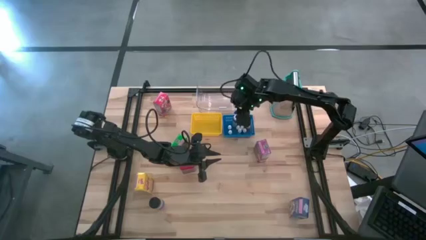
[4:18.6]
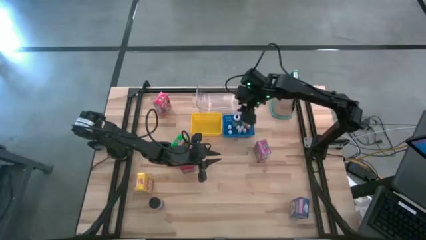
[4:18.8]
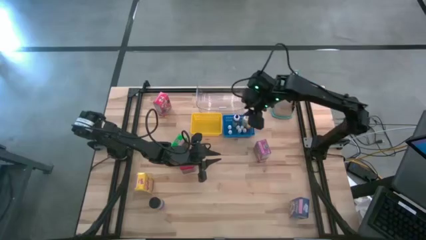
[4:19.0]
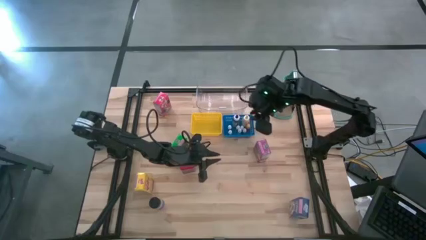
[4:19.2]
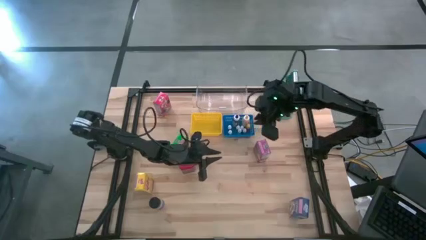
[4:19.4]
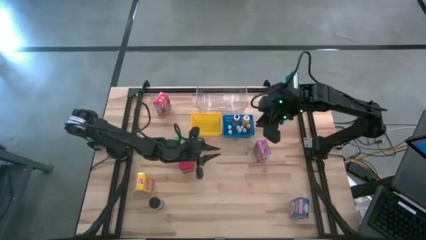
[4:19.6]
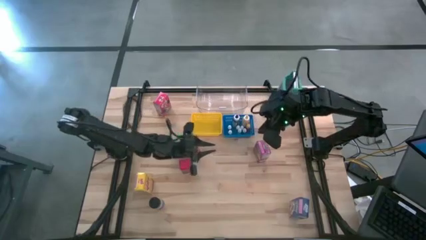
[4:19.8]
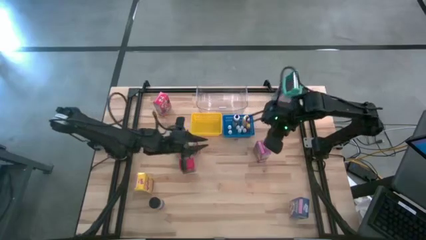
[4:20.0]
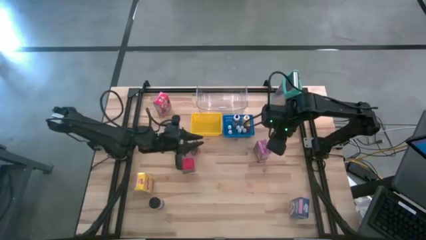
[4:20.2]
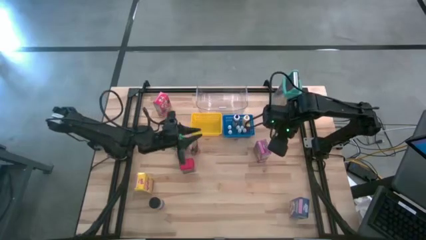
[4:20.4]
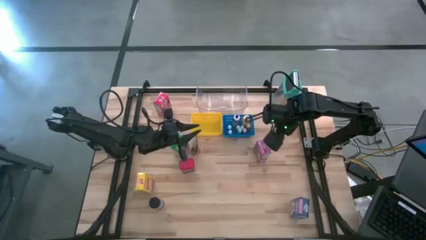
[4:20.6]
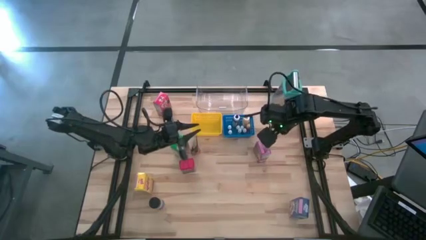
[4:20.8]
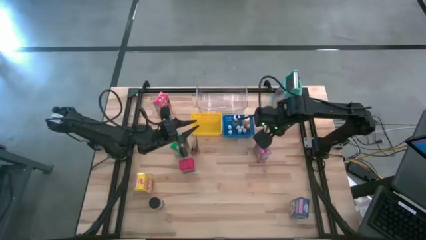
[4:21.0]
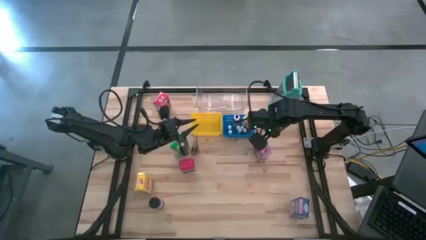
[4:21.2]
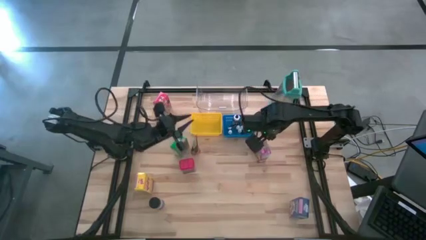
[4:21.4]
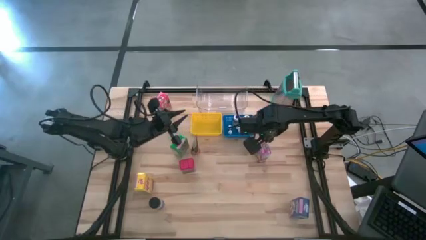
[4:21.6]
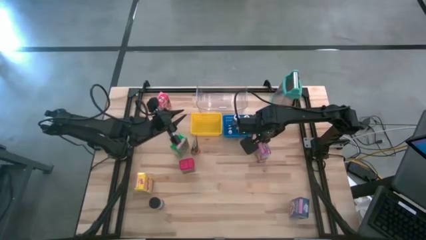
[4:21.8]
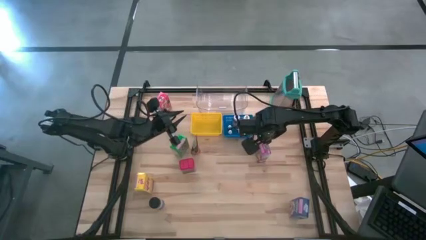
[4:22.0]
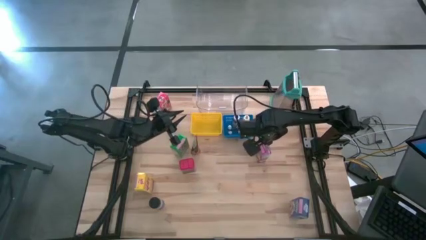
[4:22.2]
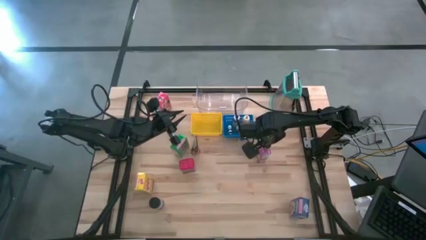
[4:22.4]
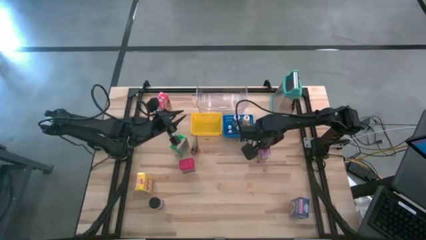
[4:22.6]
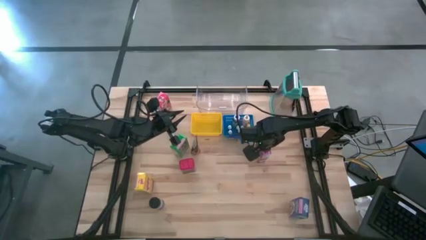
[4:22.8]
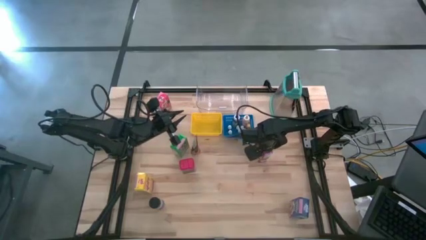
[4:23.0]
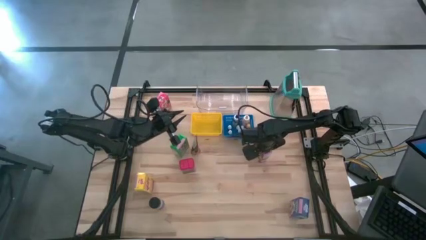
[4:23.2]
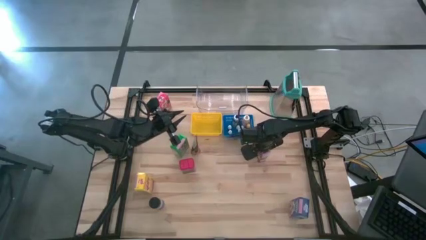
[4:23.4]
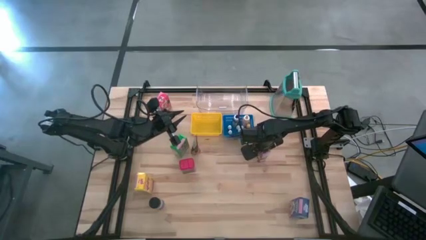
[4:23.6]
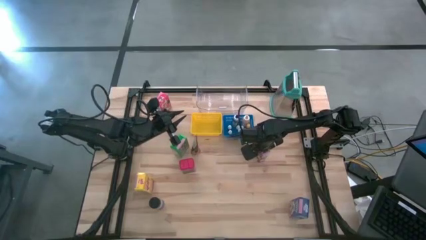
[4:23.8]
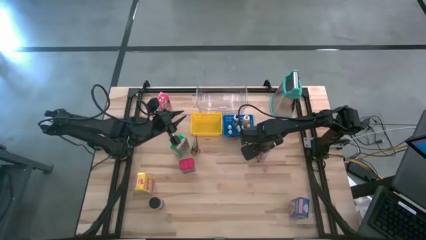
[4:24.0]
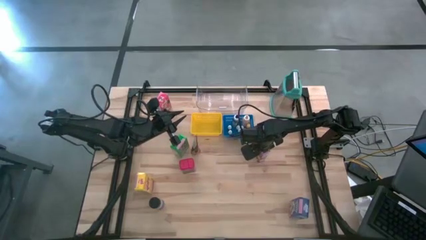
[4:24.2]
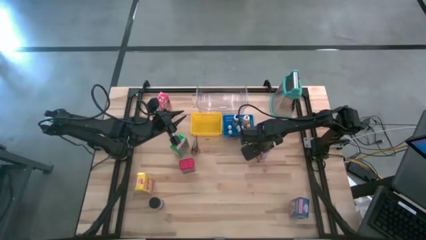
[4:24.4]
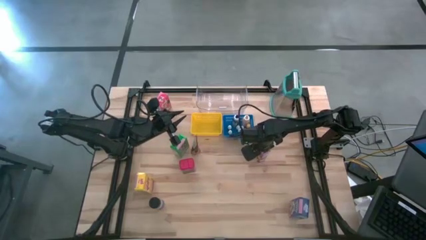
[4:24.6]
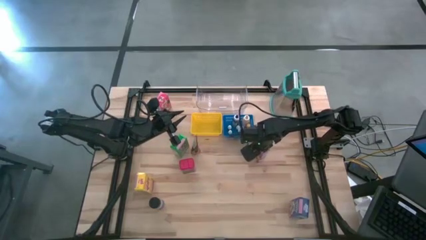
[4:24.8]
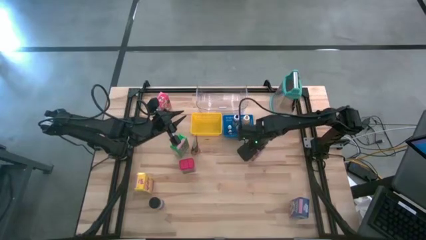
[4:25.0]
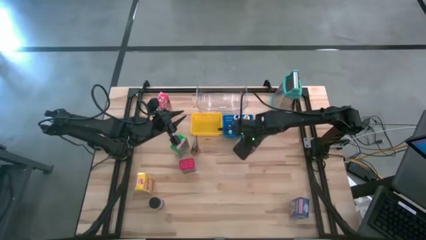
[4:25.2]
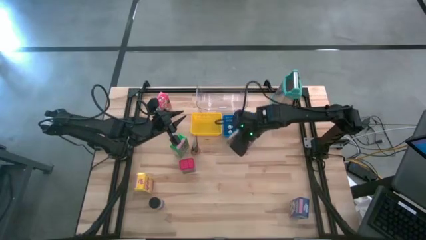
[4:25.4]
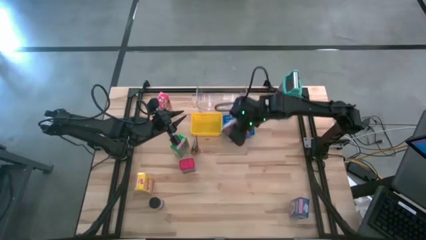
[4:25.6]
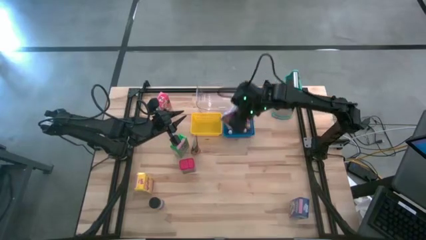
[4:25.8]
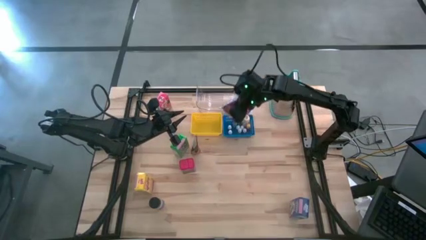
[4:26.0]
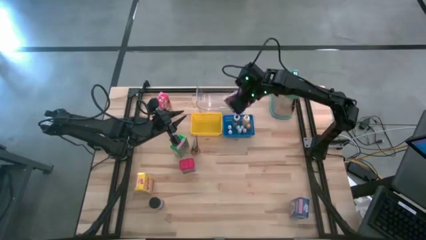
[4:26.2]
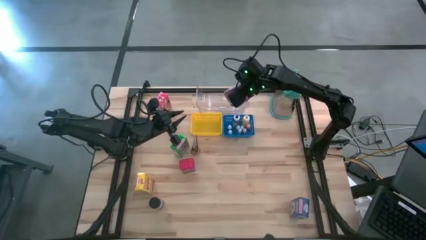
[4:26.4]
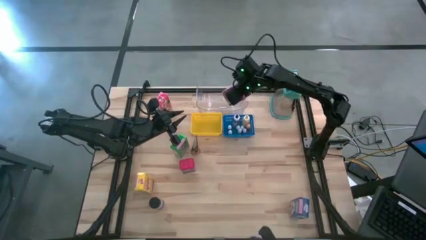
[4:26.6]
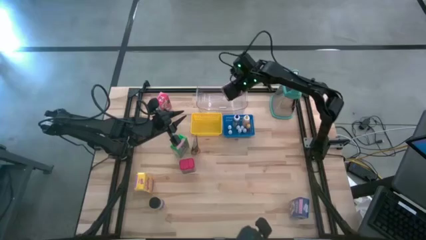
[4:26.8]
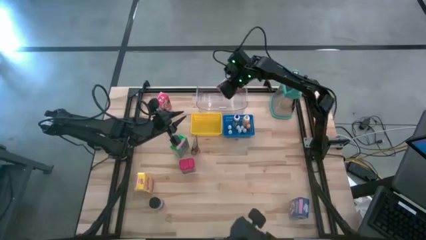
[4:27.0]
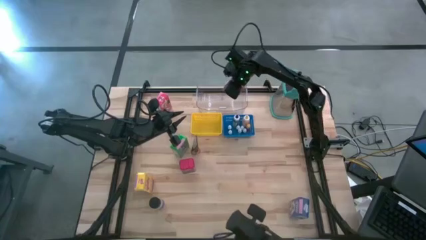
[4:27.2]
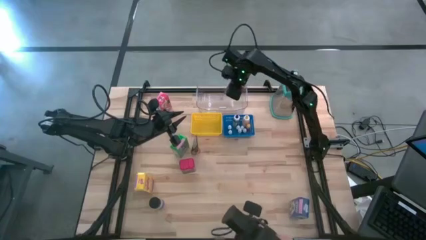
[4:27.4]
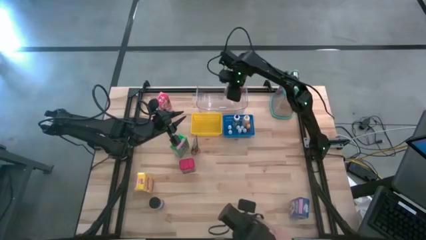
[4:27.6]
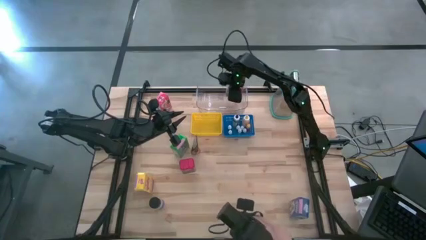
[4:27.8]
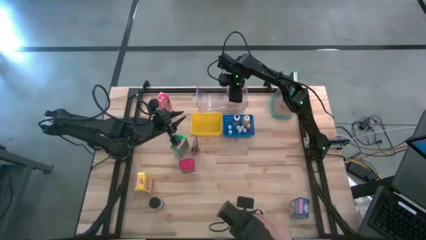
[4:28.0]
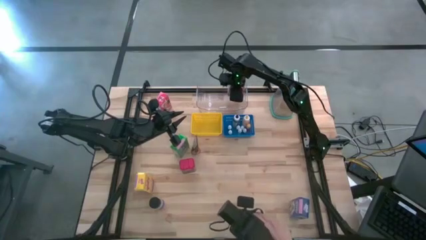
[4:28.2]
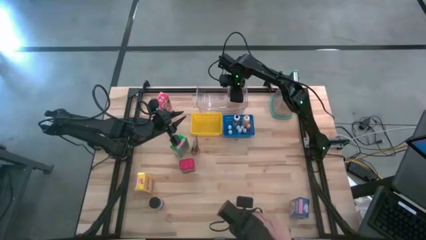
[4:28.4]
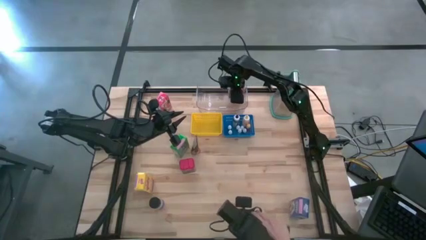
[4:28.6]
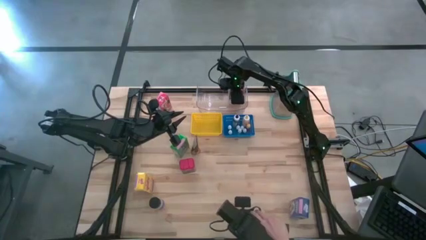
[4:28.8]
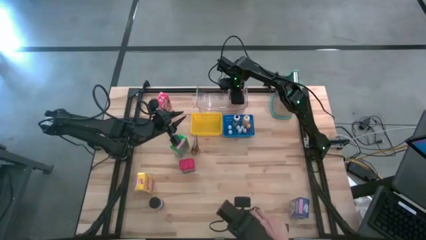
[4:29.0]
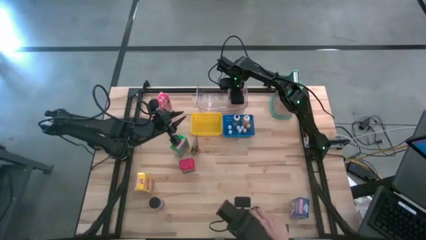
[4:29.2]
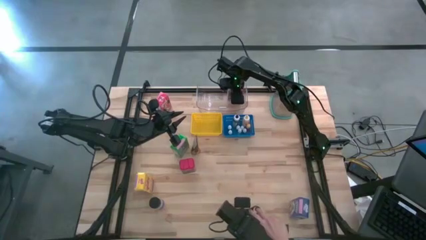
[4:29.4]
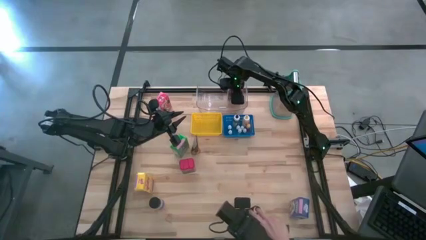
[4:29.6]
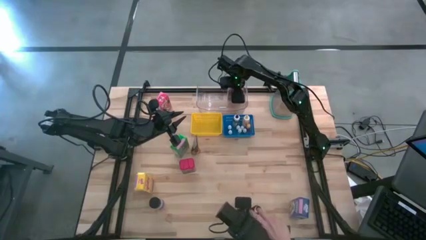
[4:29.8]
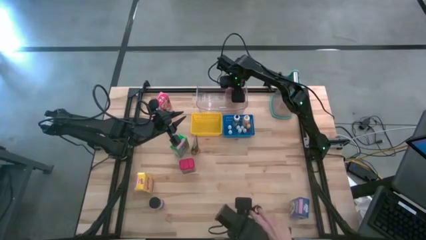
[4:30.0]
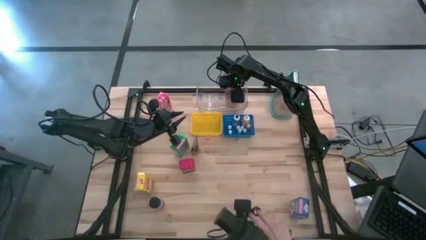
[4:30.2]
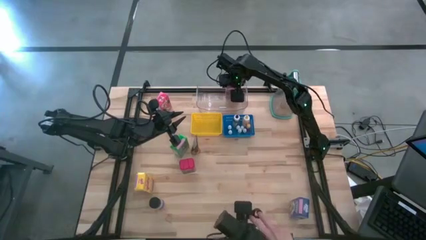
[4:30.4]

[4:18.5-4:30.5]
Task: Pick & Place Kitchen Items
Put the violet cereal box into the transparent bin

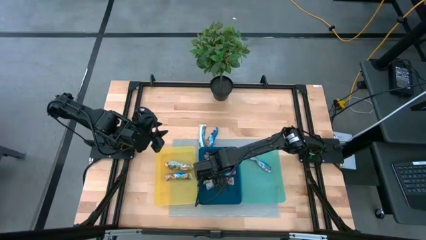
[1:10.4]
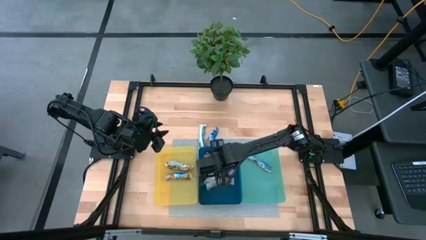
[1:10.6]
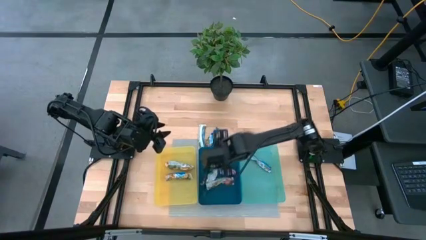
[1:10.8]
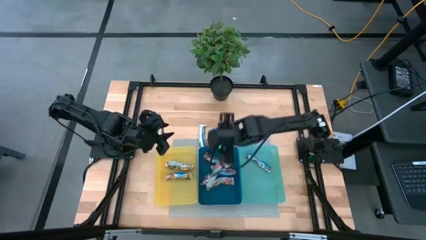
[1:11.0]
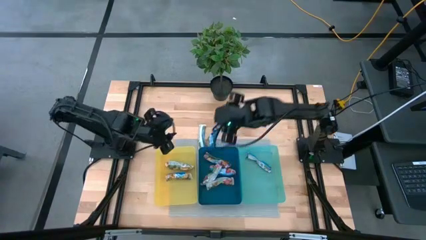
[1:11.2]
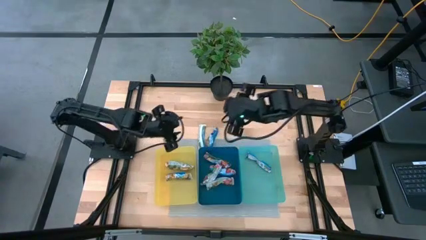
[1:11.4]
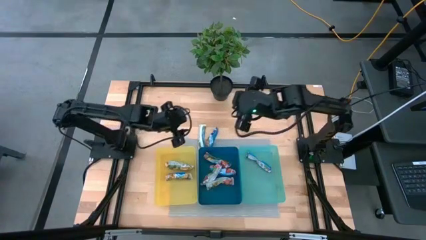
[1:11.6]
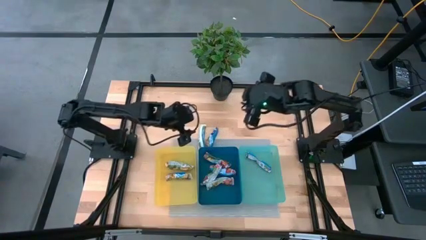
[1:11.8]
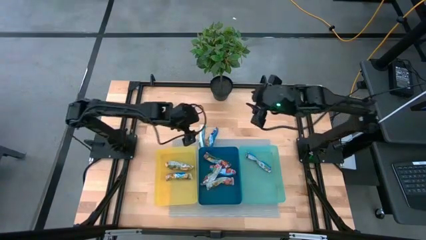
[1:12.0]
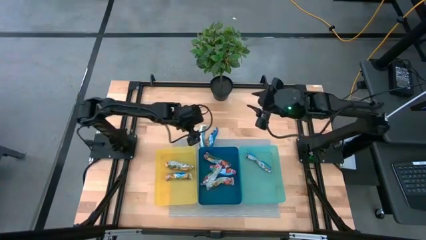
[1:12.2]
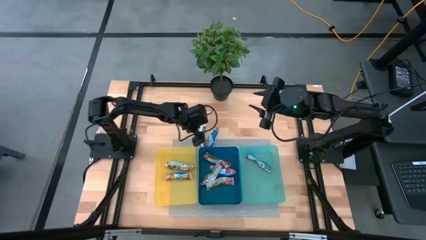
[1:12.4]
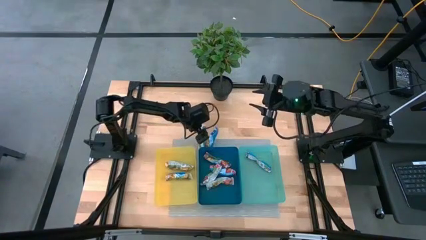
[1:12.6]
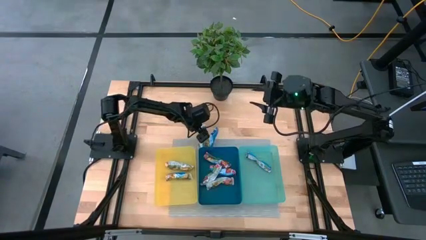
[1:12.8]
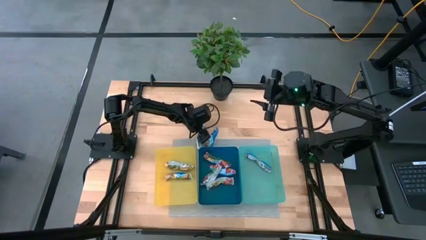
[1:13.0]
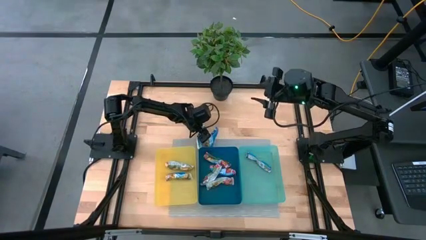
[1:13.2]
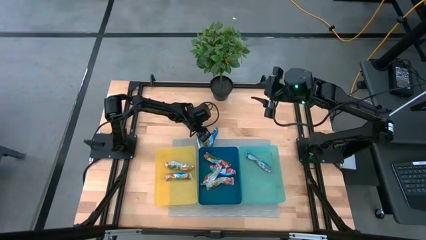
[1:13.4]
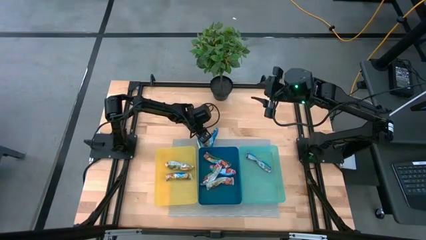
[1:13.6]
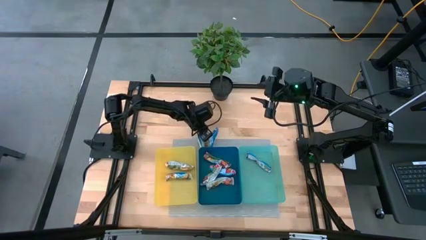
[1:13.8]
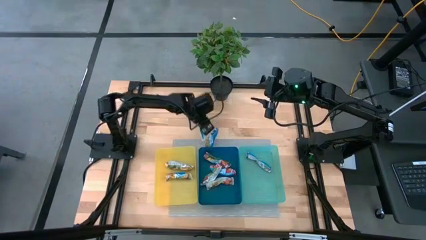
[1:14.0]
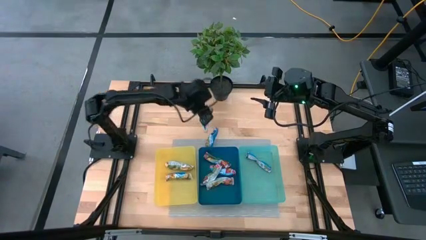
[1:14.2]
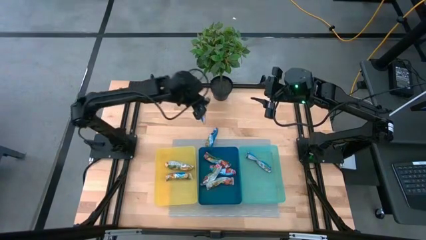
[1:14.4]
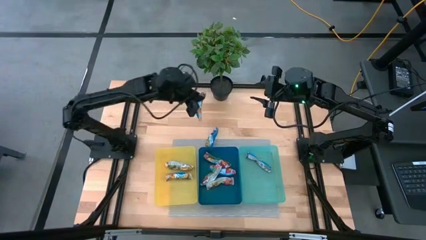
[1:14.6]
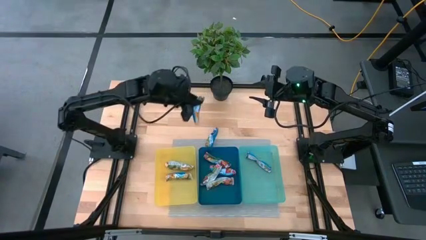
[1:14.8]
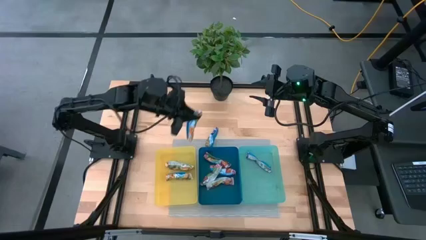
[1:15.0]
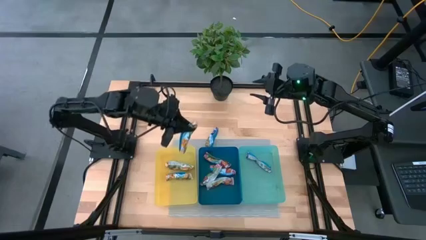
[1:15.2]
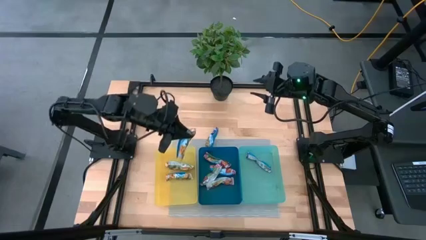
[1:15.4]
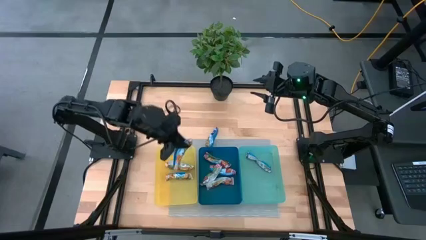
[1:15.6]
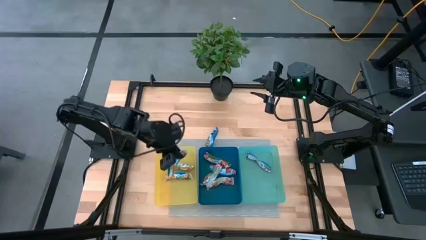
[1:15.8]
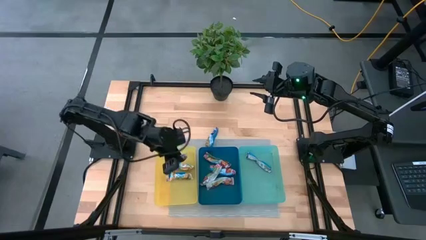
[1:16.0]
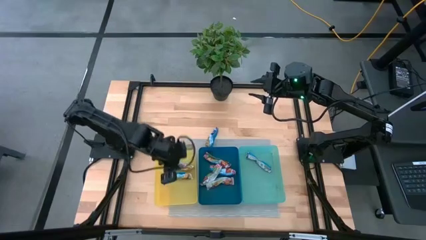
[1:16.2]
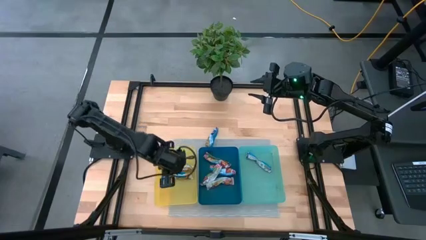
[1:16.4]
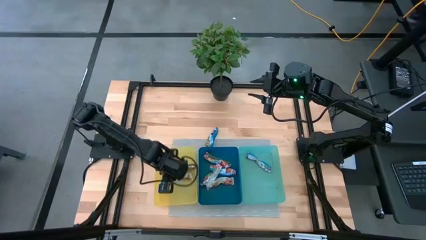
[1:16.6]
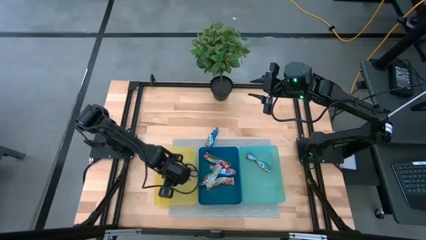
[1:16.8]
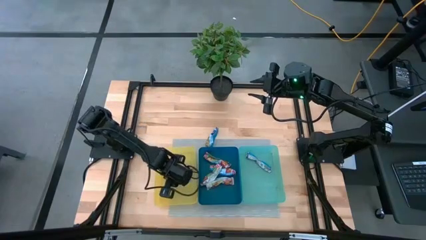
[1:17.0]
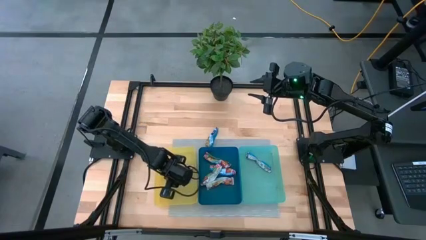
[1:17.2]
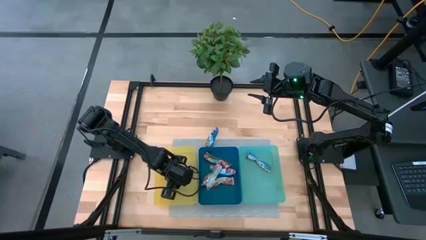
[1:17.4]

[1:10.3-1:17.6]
Task: Pick and place Granola Bars by type
Put the yellow granola bar into the yellow bin
